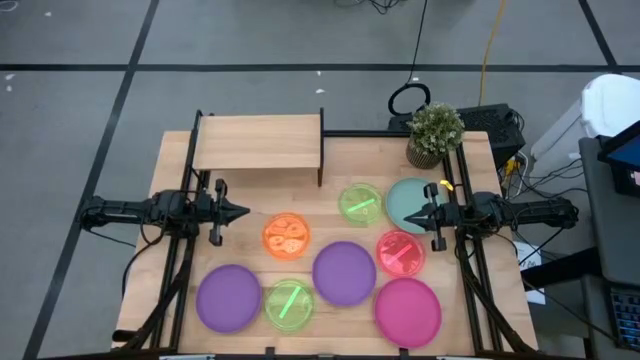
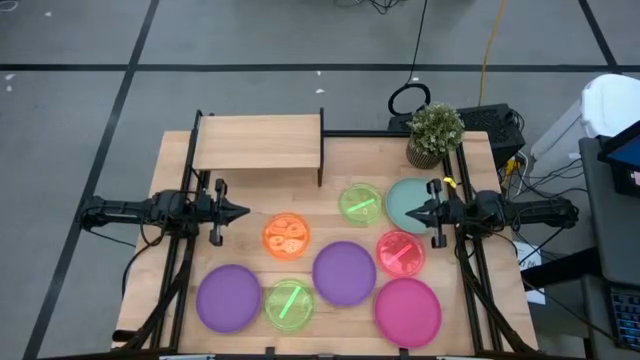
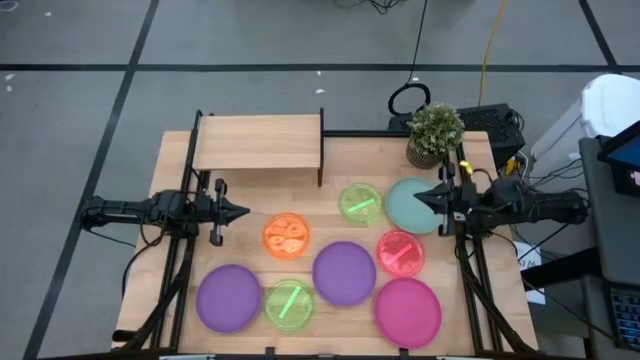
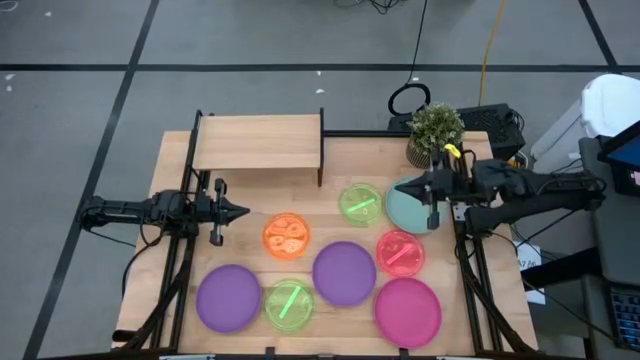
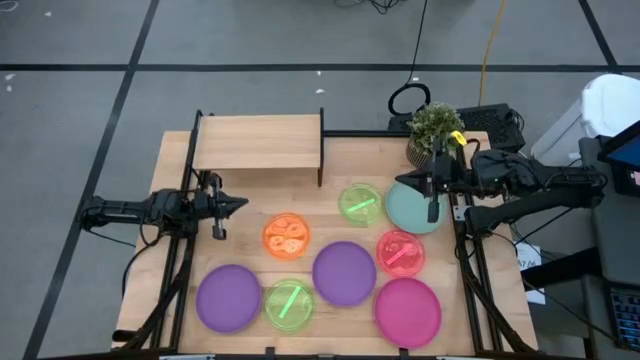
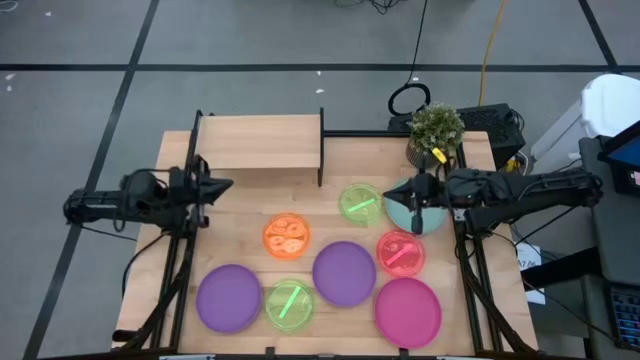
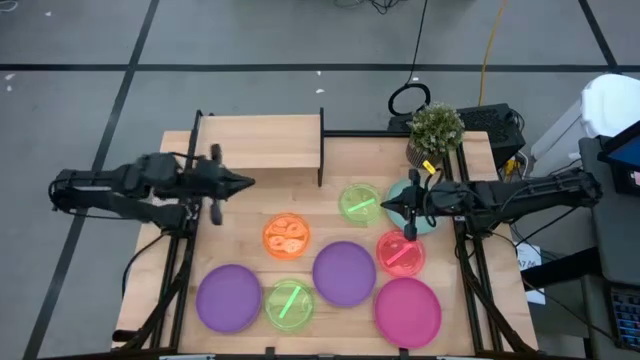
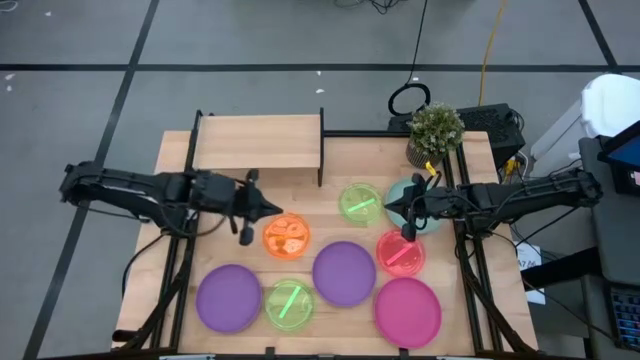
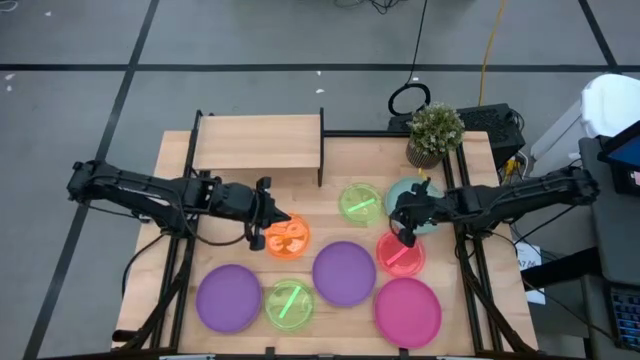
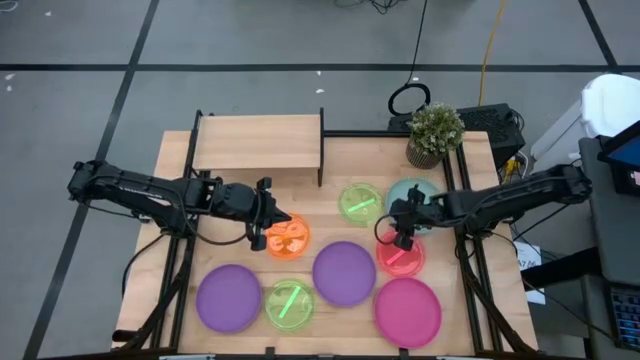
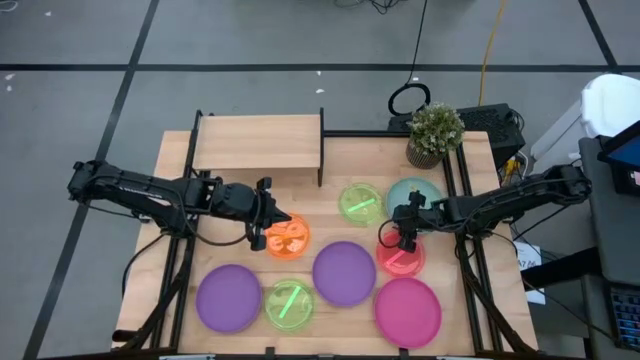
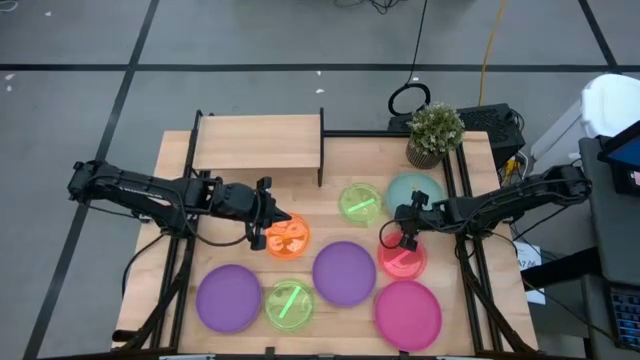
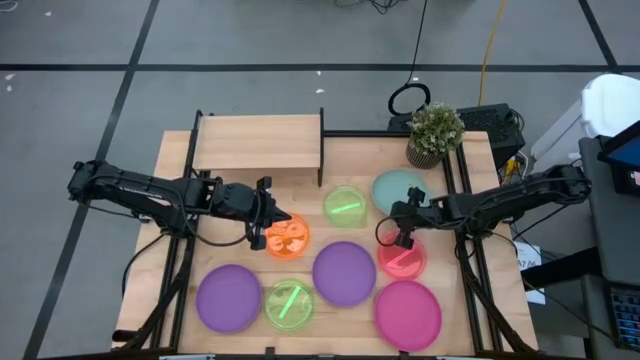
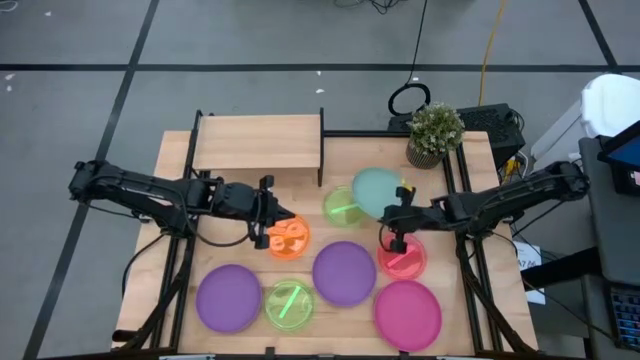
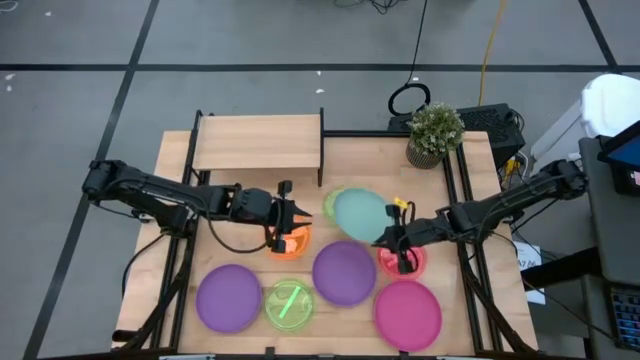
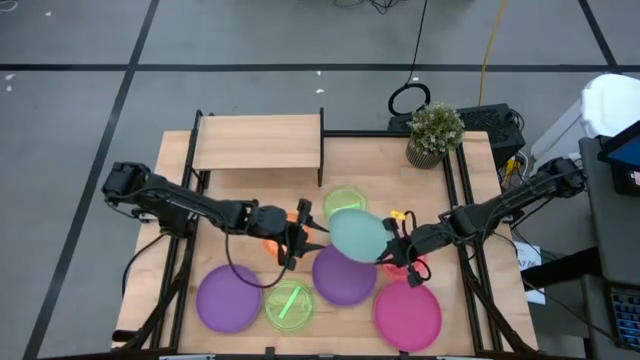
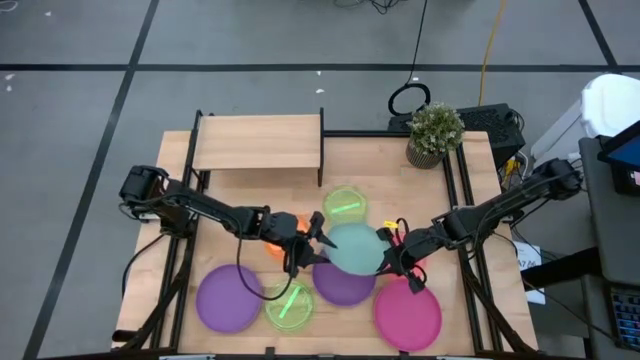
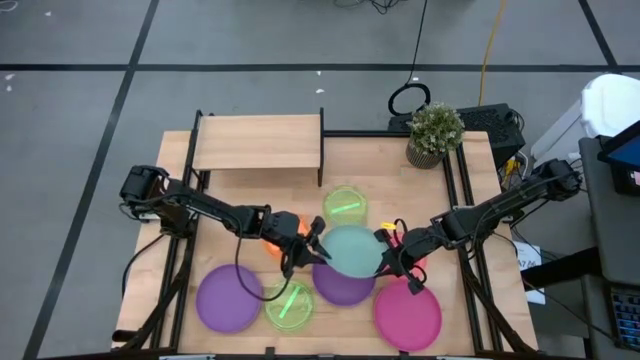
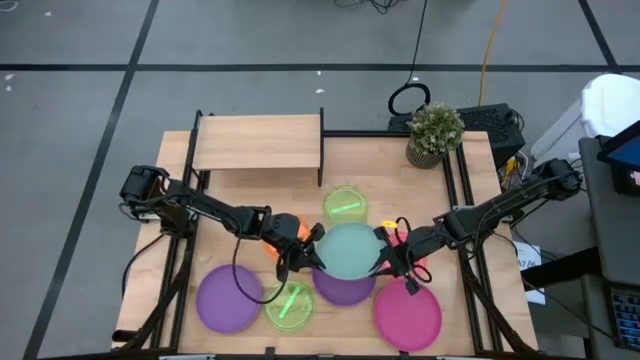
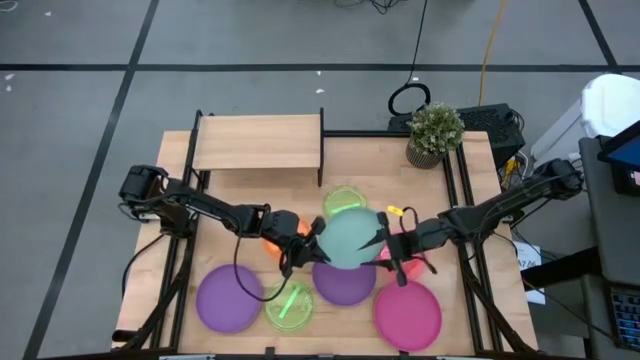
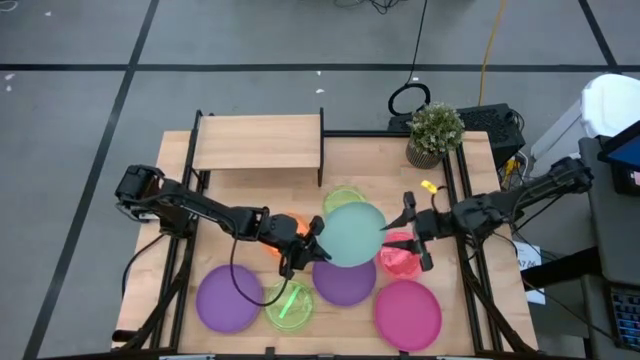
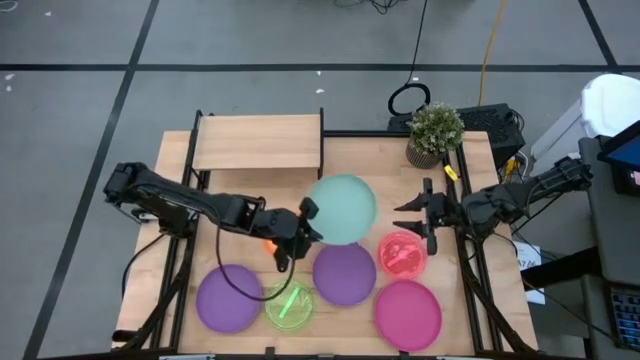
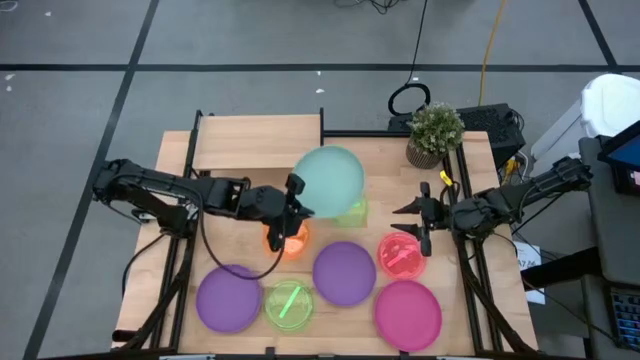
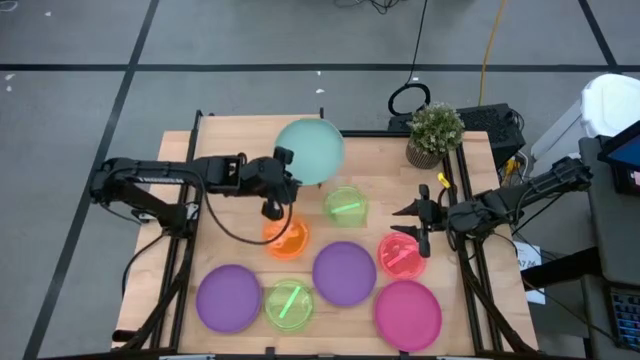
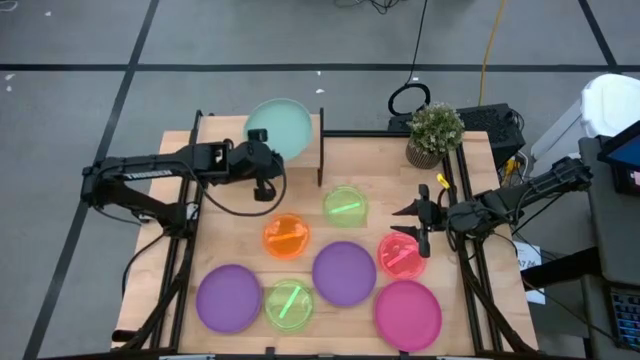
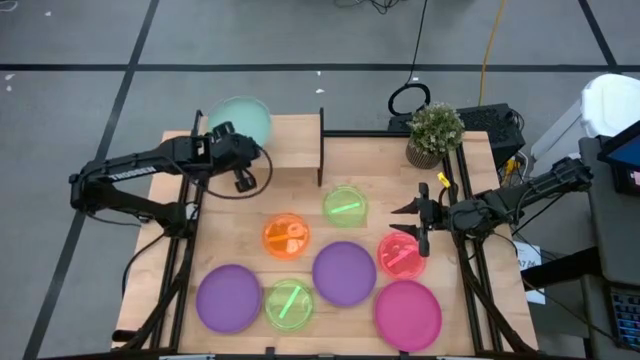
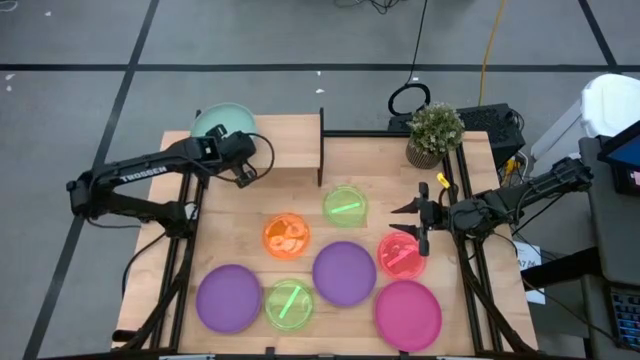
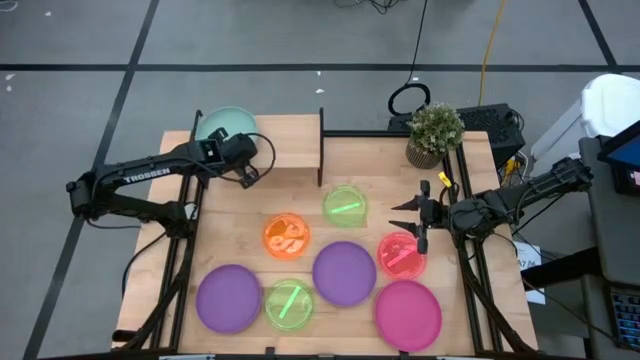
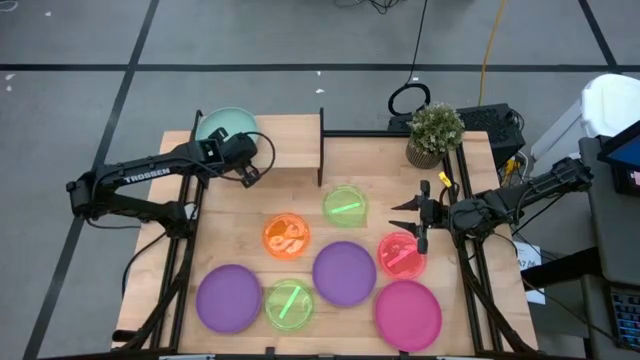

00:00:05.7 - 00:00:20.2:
Task: Place and stack plates onto a shelf
Put the green plate on the shelf

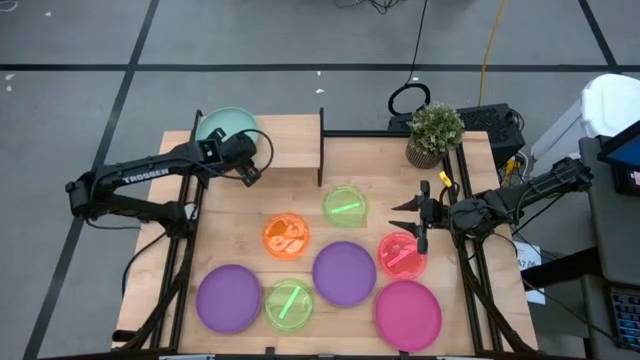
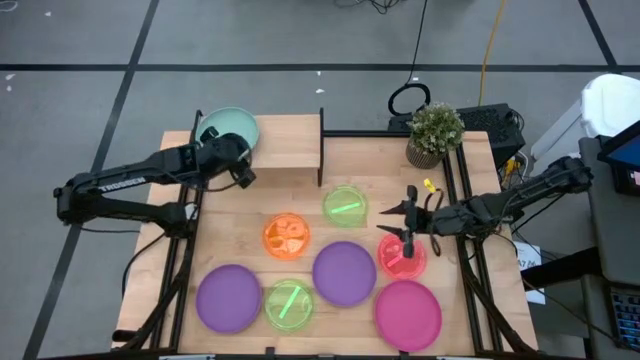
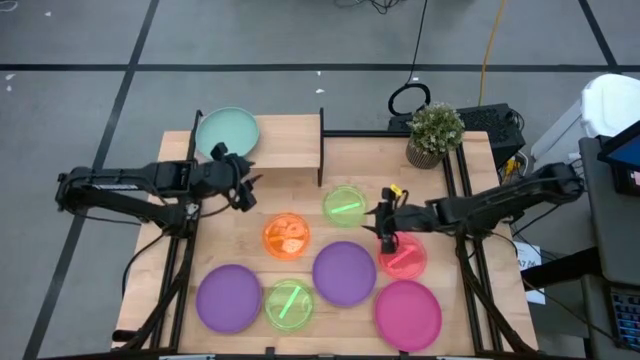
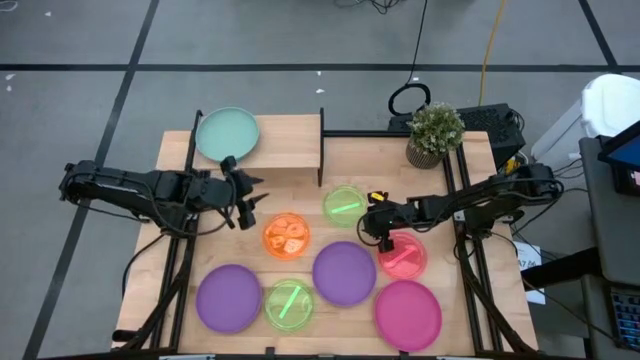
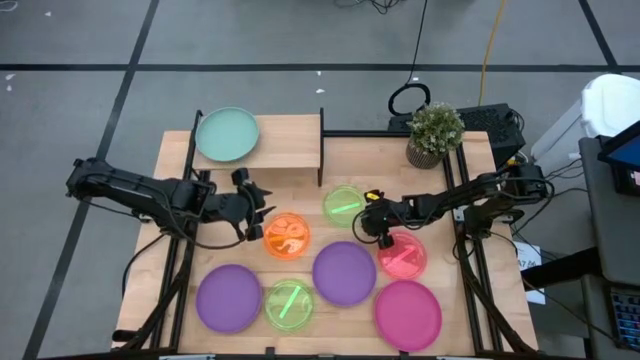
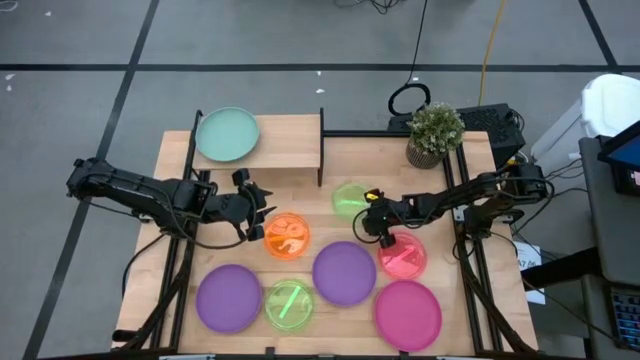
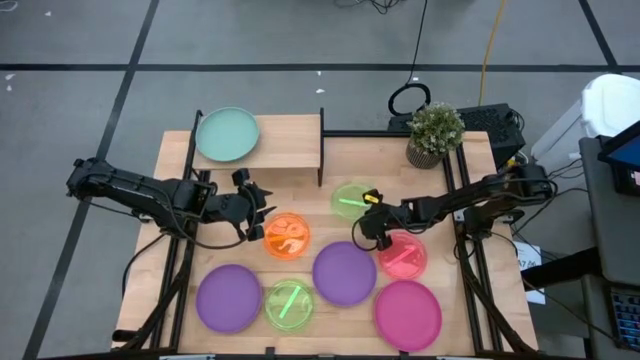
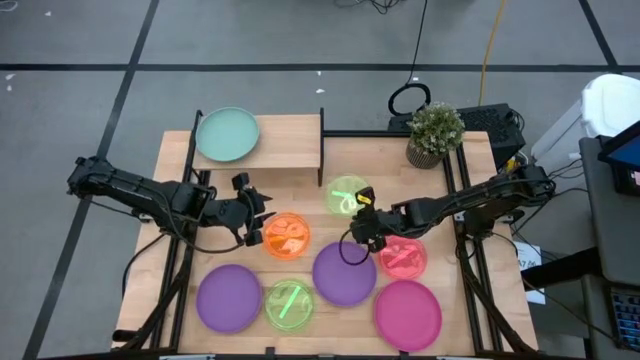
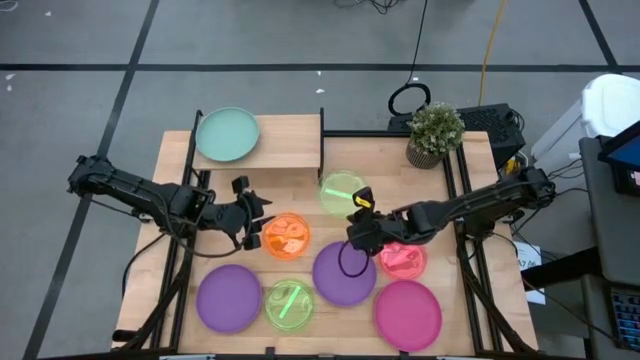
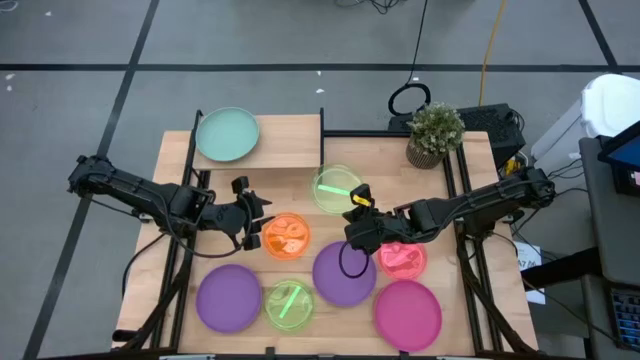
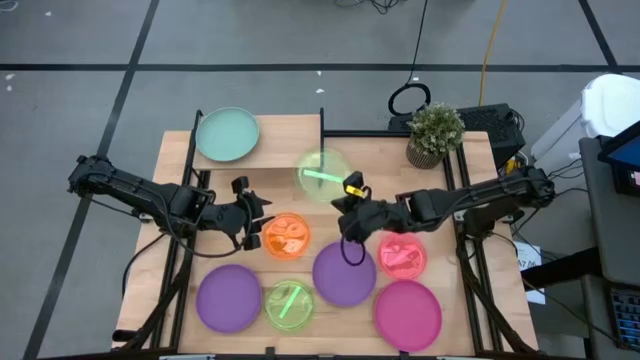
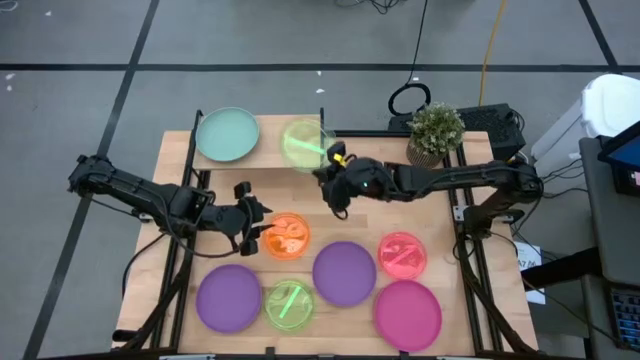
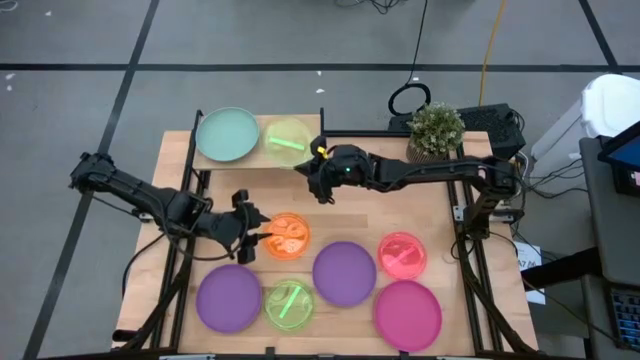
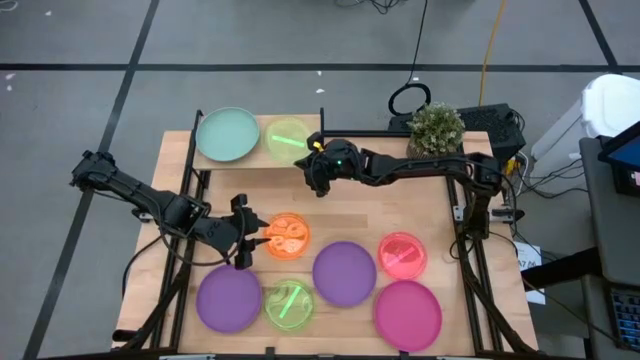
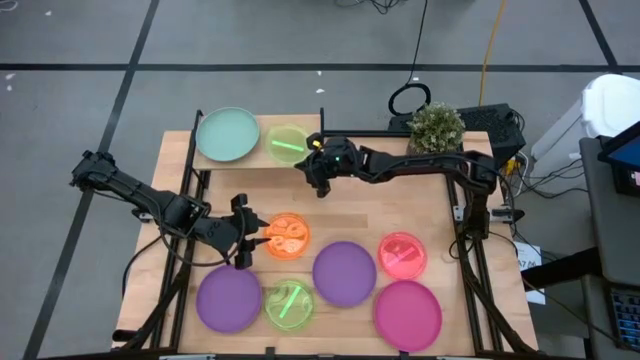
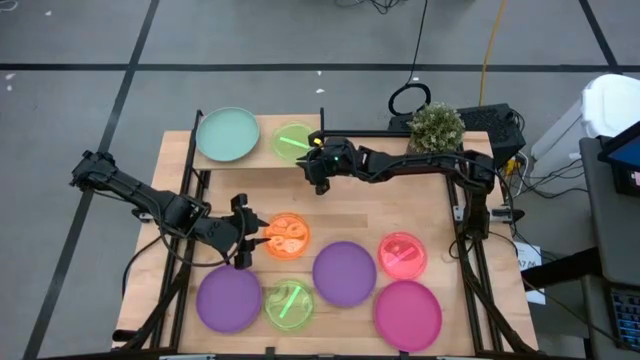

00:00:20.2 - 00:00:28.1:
Put the right transparent green plate on the shelf
